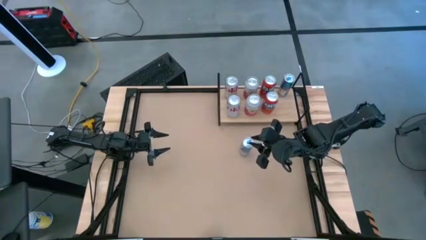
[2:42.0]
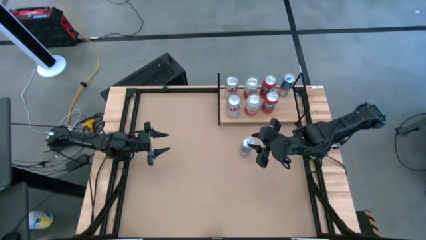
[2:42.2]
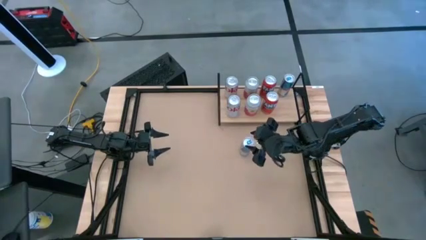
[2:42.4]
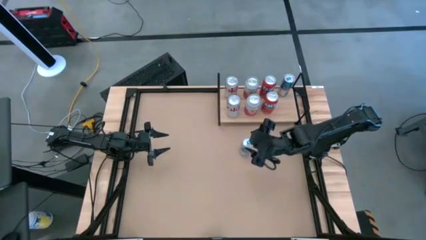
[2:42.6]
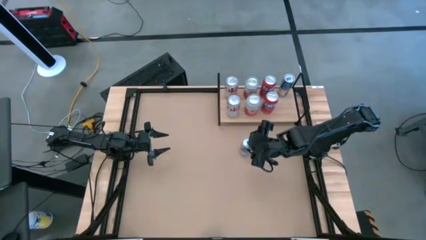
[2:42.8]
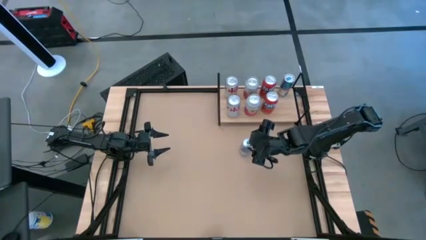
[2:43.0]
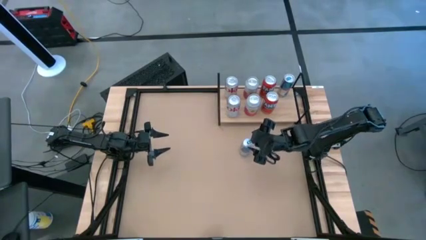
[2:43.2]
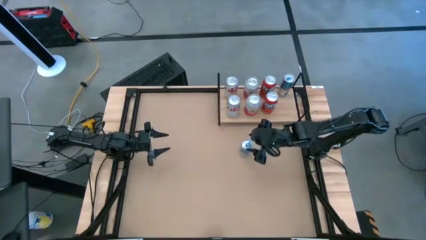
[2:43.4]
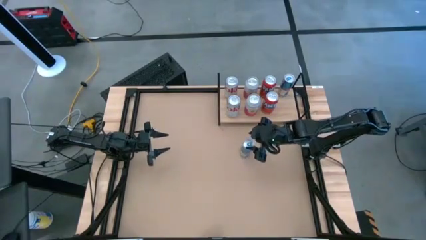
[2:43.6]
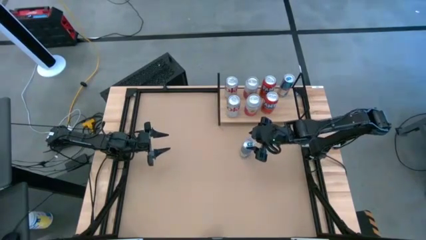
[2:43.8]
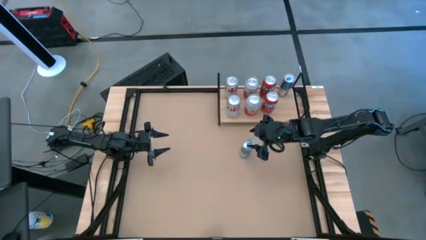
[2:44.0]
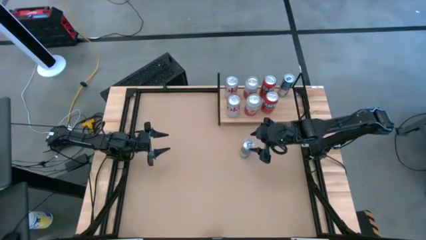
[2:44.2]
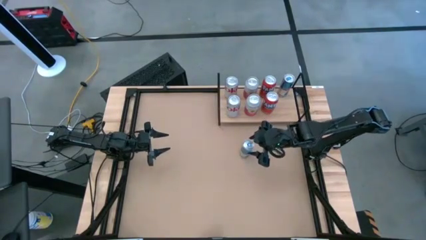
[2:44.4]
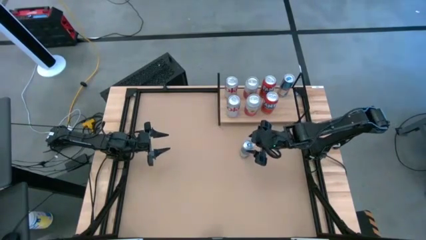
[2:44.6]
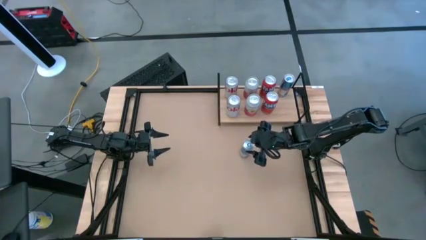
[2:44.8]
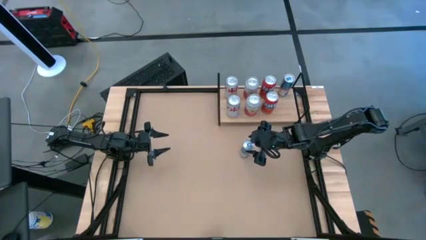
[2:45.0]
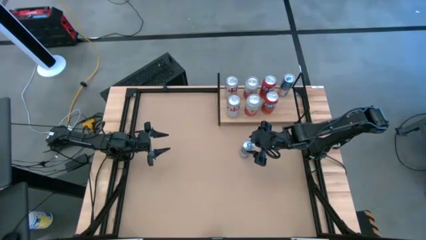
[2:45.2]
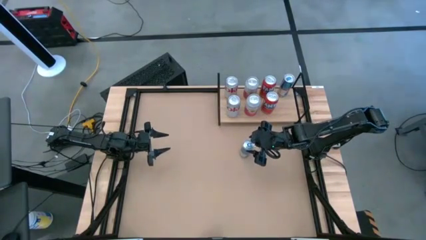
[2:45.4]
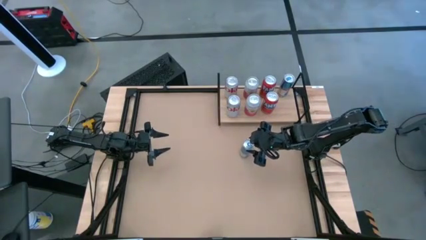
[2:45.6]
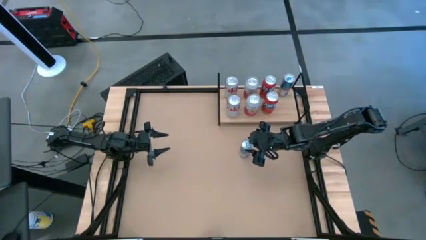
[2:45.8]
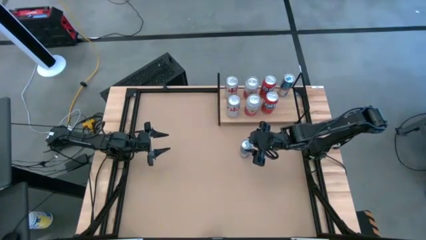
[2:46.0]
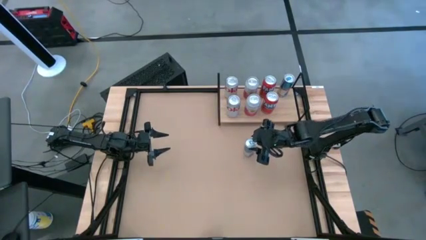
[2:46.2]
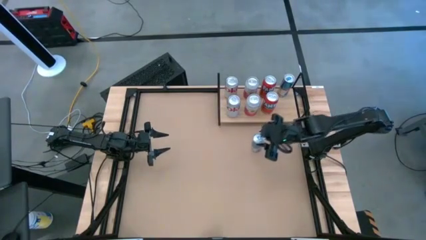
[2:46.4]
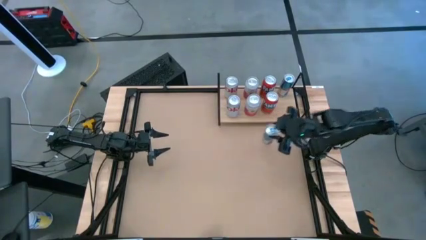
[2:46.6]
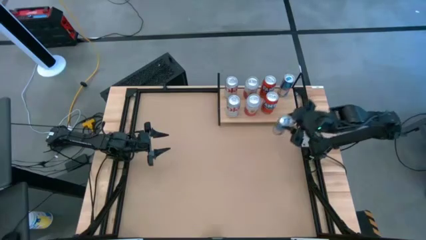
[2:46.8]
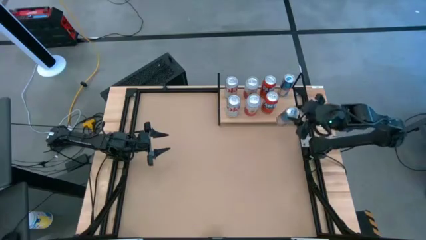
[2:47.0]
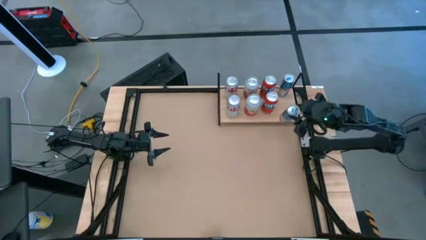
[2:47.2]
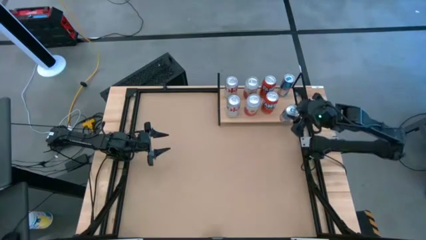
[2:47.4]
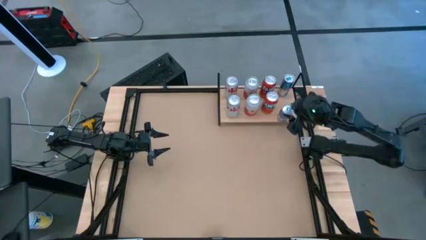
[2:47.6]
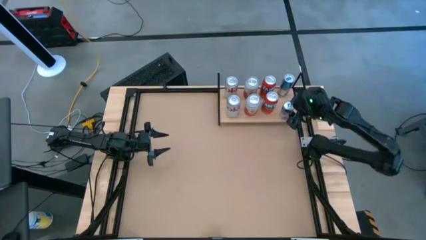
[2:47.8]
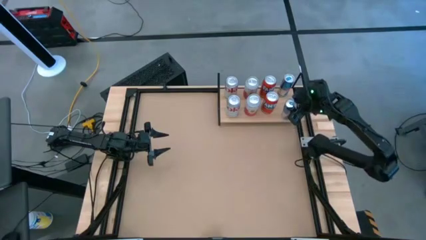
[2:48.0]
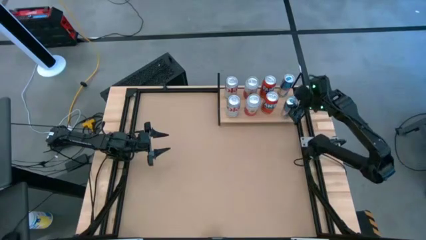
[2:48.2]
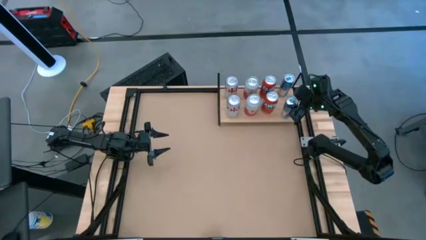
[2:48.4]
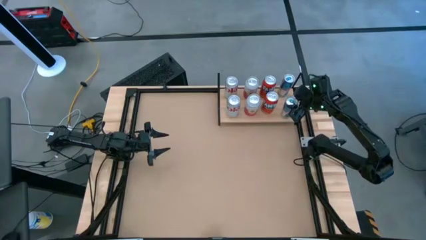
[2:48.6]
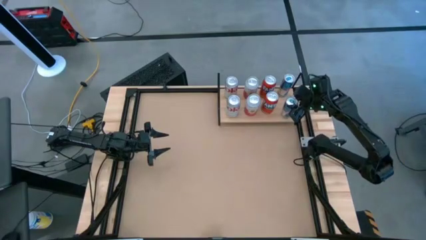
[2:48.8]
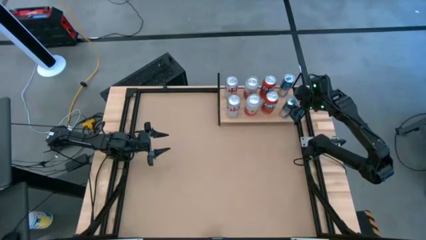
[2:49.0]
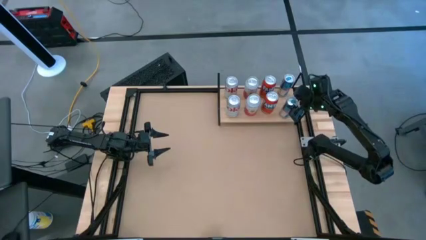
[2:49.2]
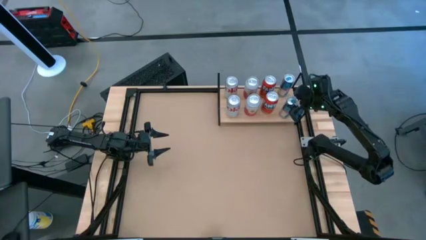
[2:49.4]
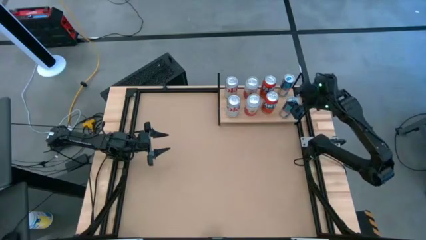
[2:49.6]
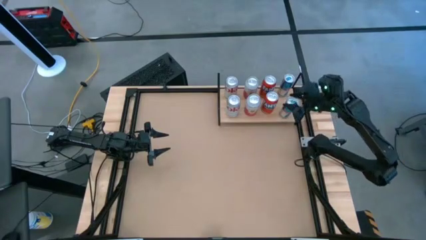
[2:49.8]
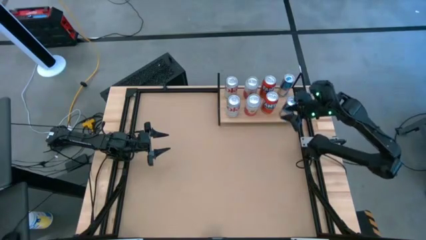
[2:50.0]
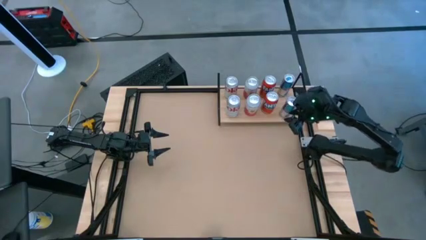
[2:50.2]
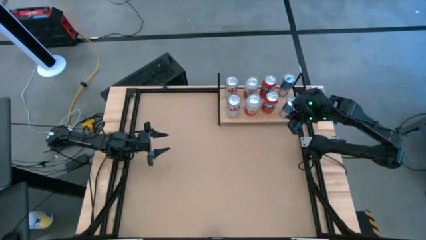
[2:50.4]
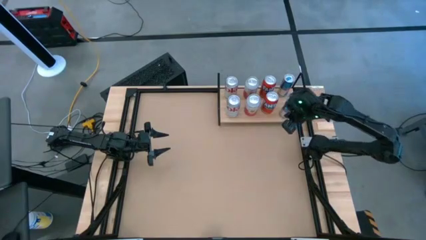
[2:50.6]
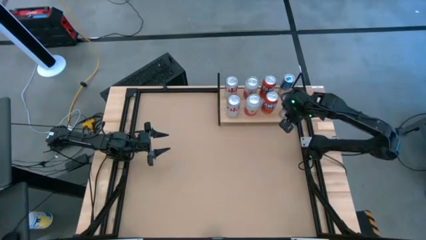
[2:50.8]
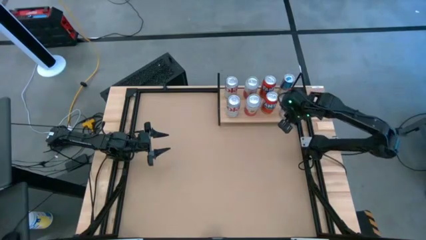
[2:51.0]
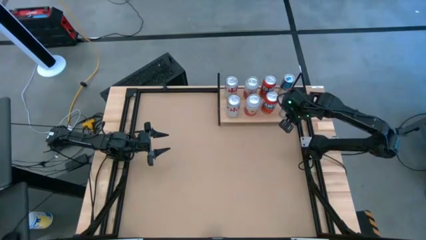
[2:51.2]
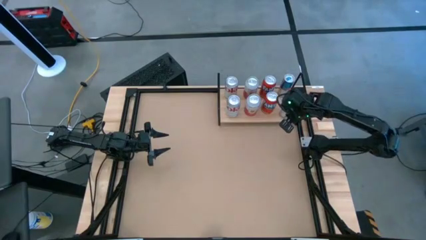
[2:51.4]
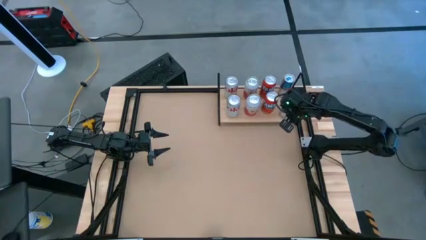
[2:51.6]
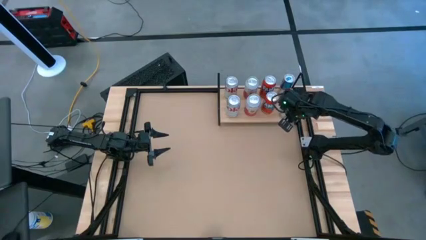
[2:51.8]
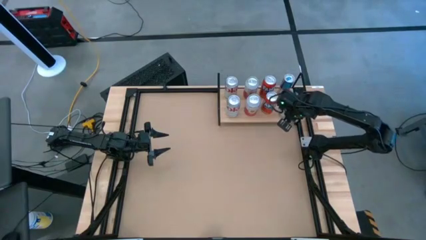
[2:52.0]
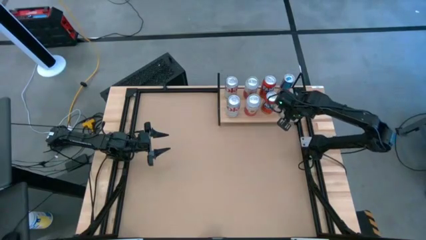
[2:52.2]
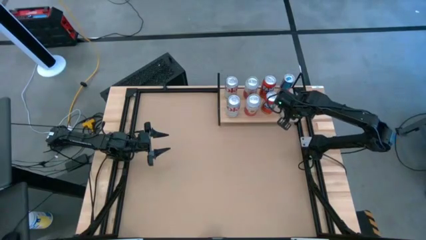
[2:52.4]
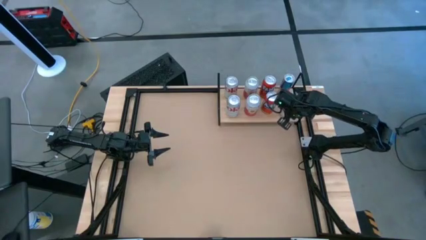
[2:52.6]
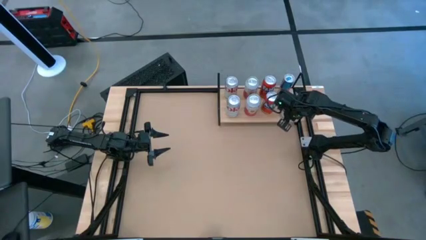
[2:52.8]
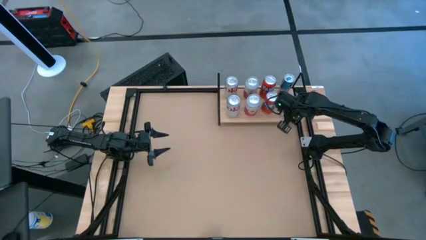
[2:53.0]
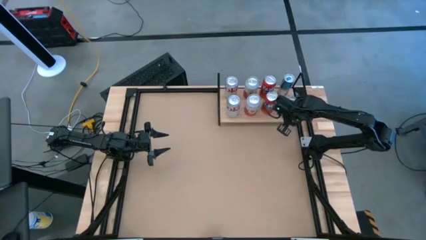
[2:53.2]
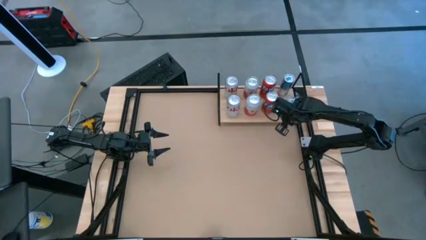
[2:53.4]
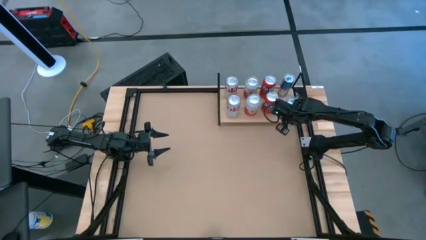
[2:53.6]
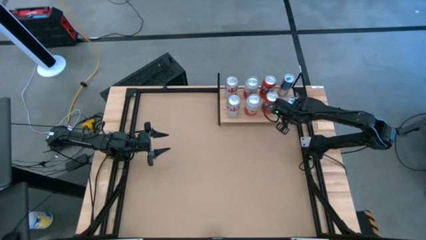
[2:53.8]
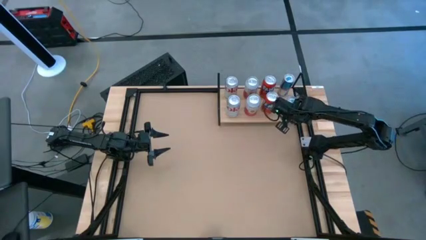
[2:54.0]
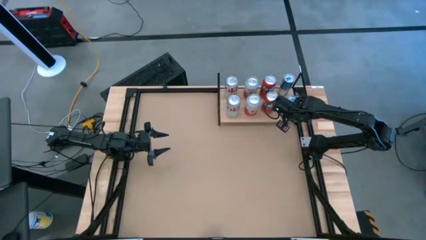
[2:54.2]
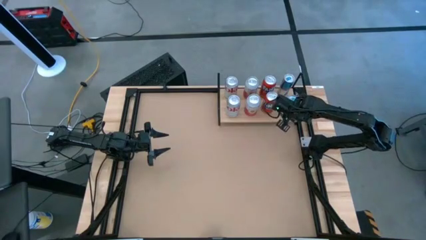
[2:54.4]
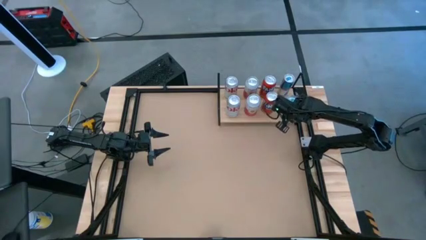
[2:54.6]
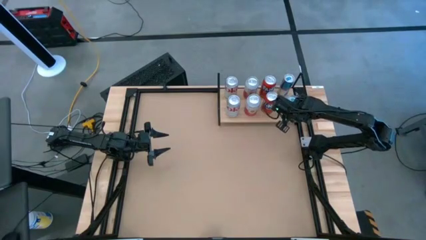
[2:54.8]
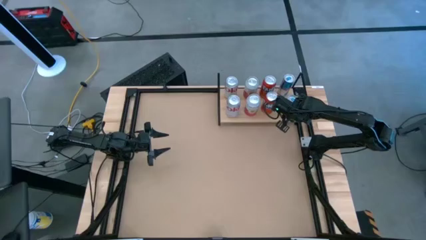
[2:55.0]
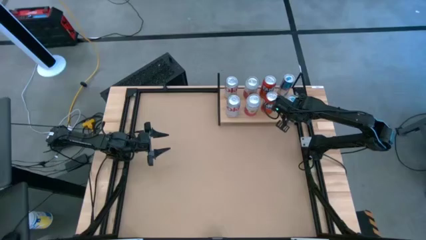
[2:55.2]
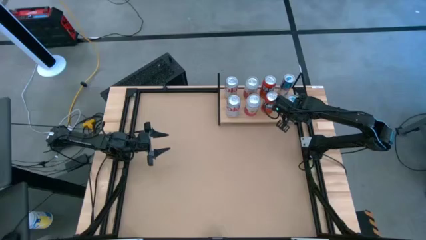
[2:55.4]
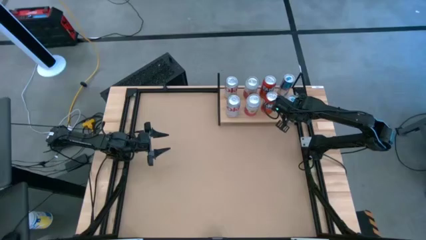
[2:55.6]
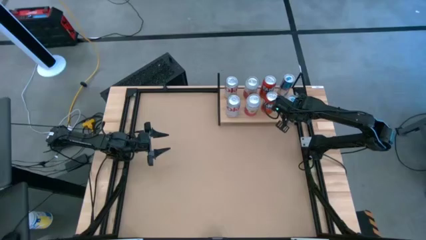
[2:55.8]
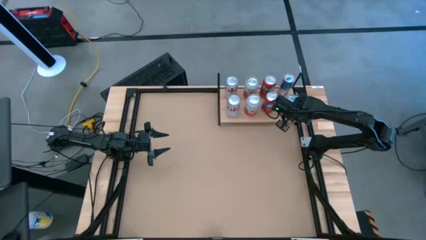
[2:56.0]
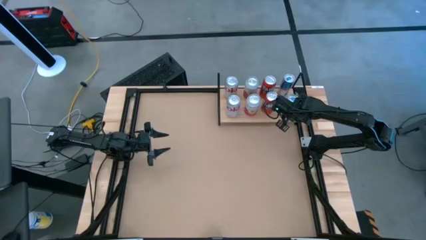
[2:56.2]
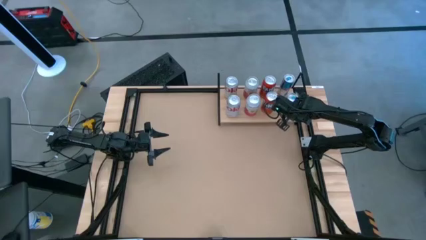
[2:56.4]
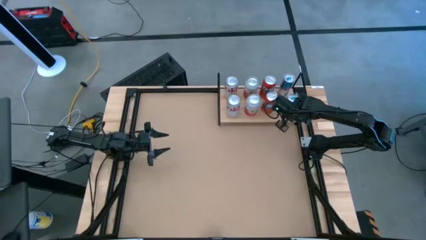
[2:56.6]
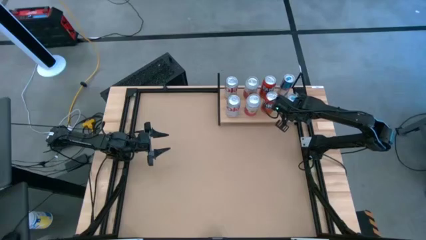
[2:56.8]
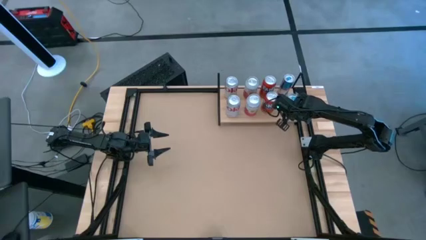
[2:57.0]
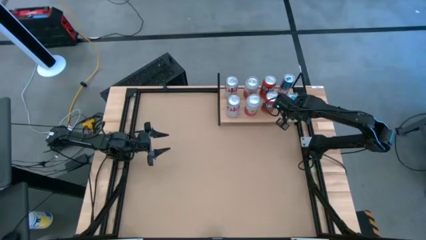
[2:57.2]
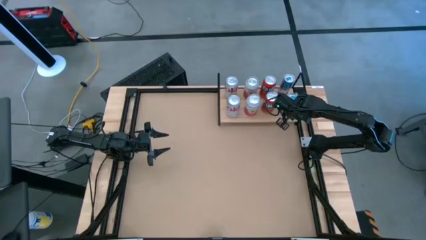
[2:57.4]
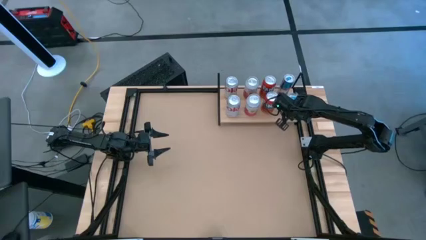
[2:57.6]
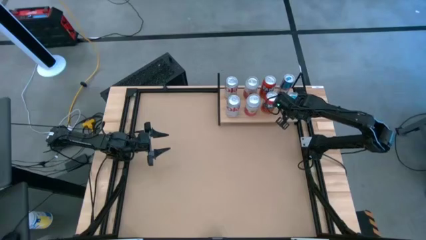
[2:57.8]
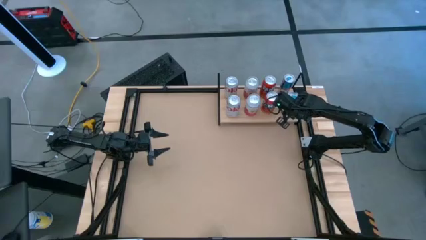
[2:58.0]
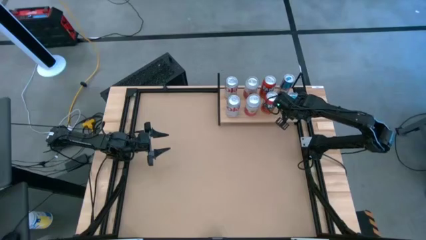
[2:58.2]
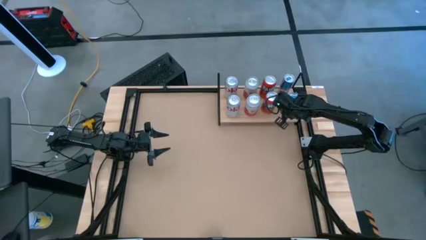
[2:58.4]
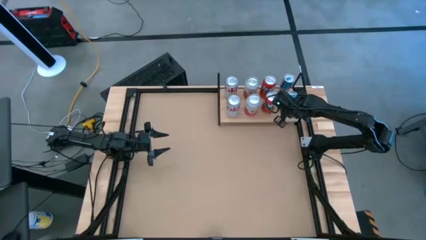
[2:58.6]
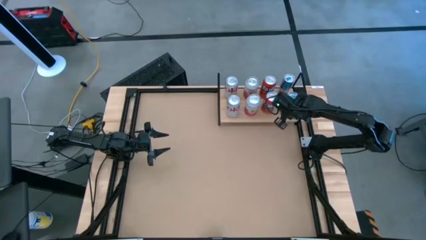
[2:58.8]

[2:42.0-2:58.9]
Task: Place canned beverage on shelf
Put the blue soda can on the shelf
